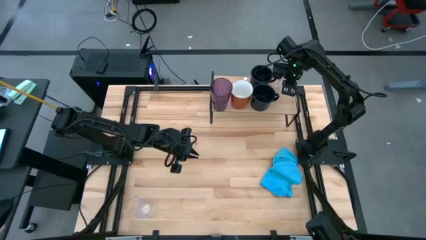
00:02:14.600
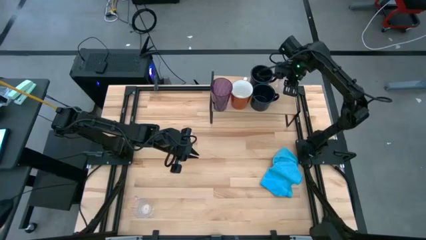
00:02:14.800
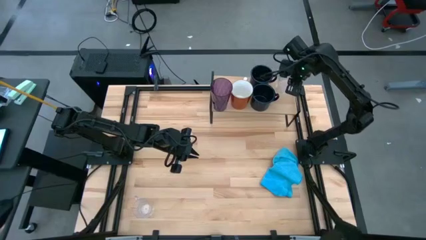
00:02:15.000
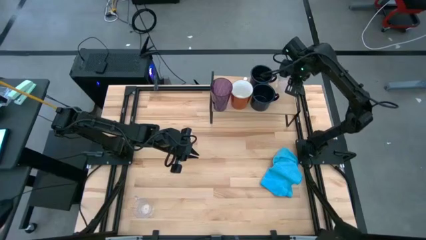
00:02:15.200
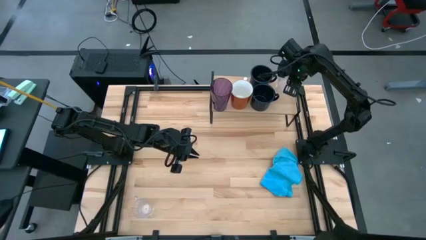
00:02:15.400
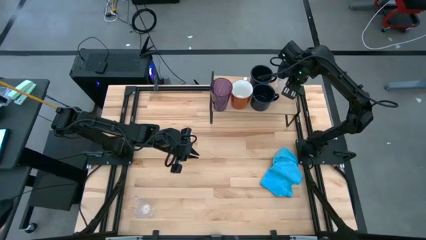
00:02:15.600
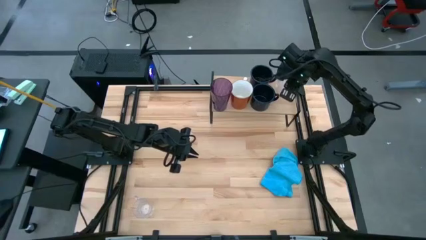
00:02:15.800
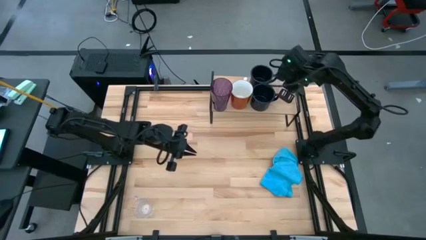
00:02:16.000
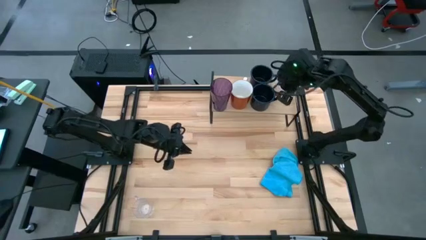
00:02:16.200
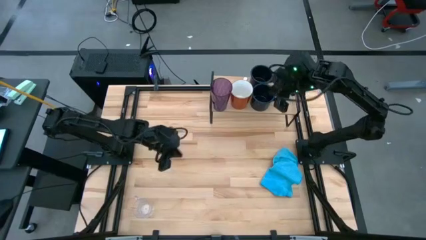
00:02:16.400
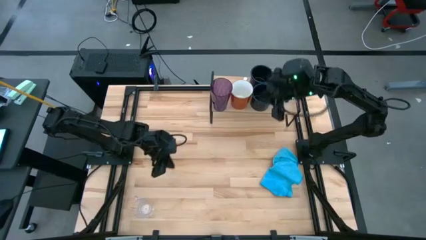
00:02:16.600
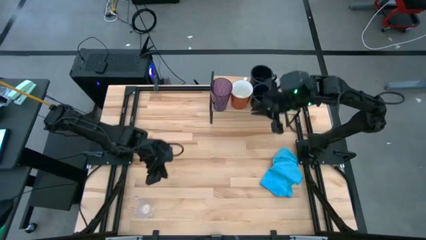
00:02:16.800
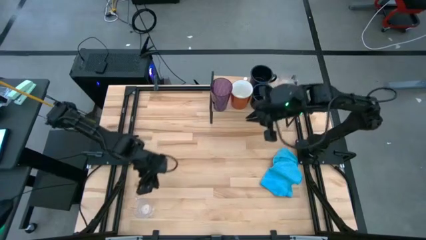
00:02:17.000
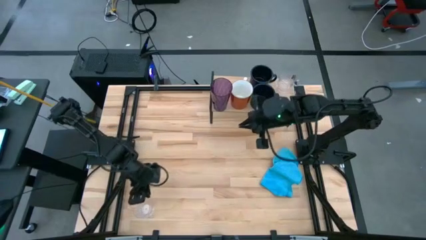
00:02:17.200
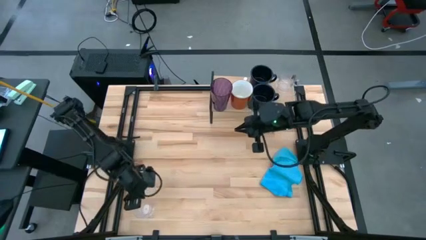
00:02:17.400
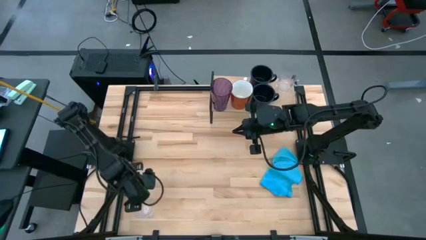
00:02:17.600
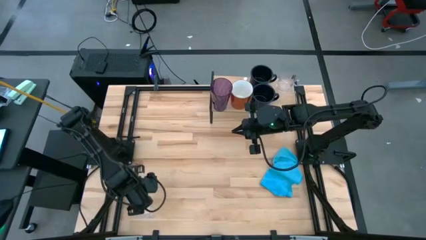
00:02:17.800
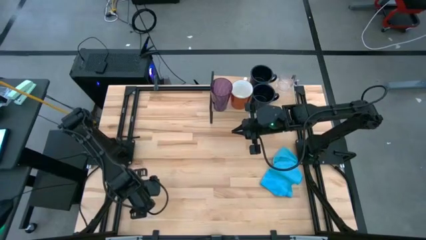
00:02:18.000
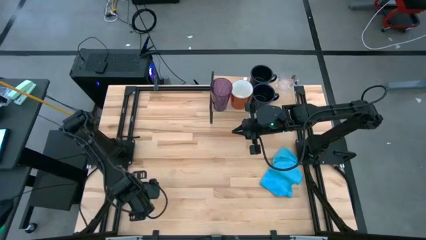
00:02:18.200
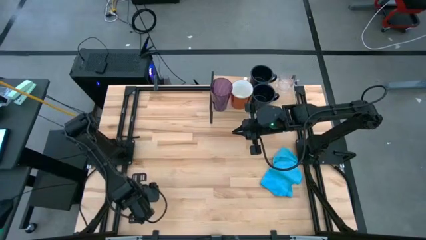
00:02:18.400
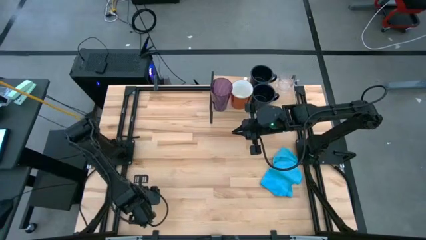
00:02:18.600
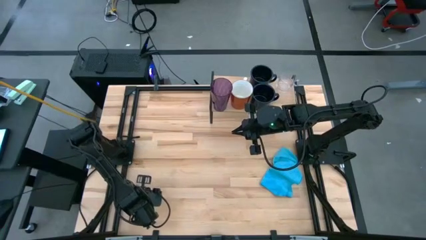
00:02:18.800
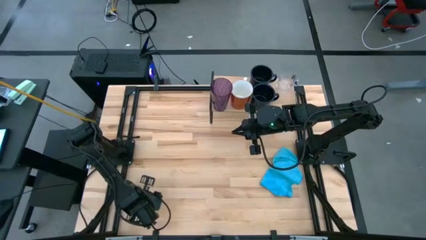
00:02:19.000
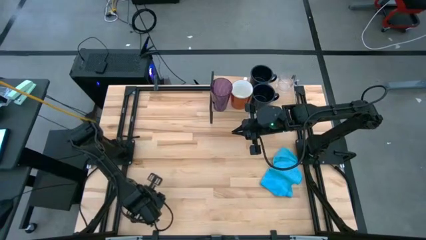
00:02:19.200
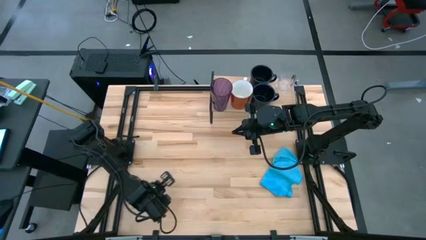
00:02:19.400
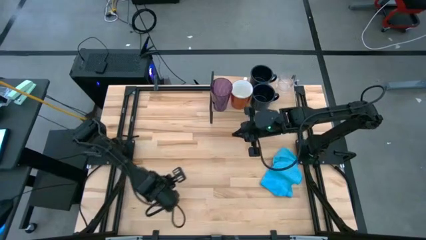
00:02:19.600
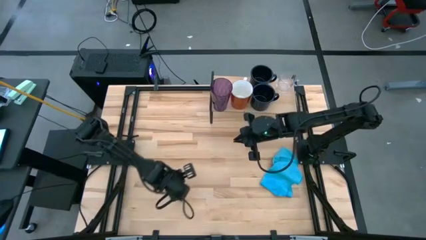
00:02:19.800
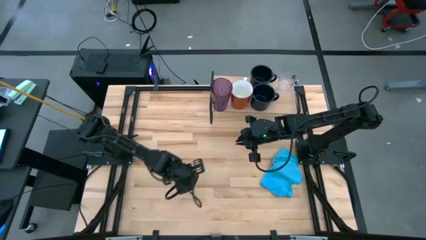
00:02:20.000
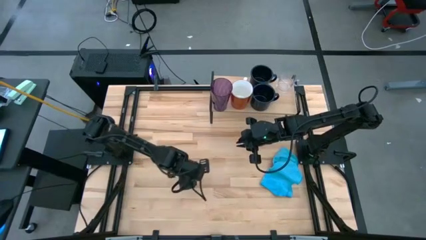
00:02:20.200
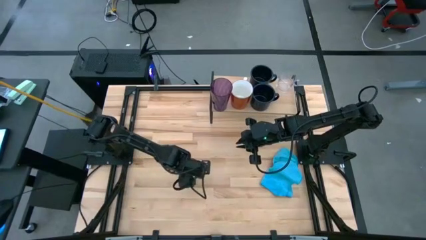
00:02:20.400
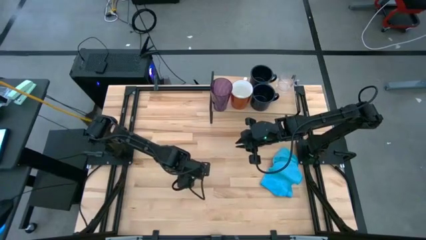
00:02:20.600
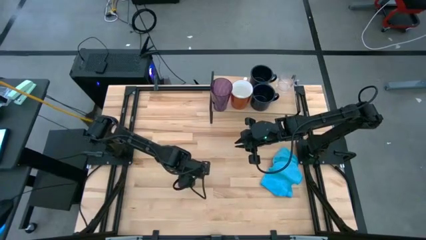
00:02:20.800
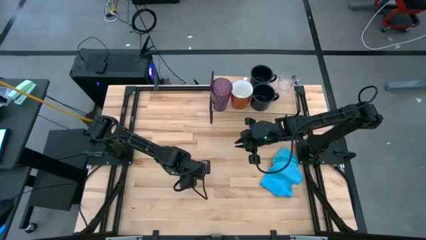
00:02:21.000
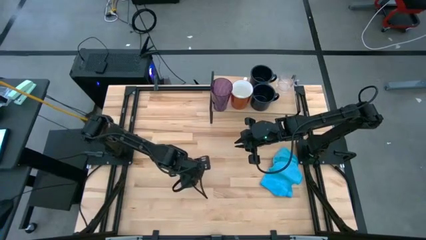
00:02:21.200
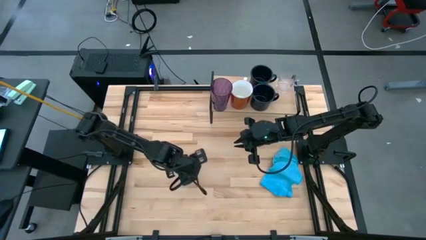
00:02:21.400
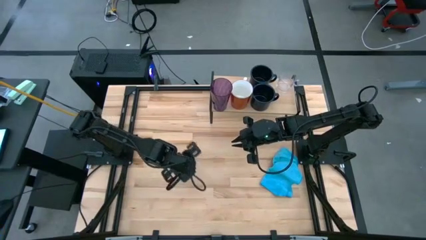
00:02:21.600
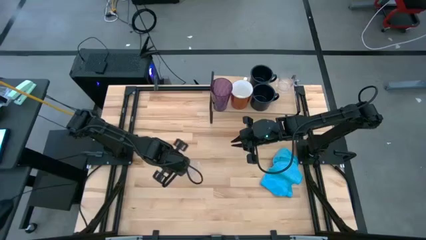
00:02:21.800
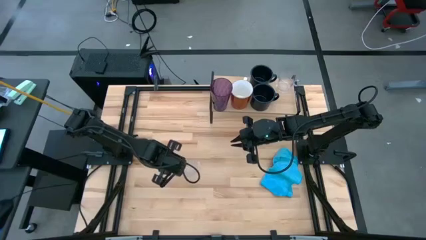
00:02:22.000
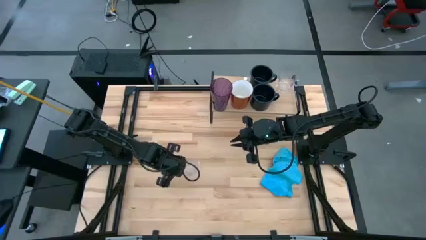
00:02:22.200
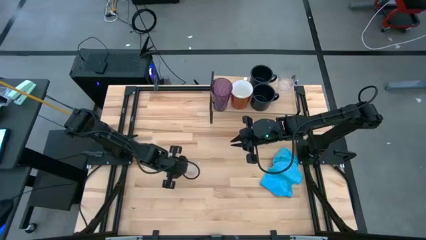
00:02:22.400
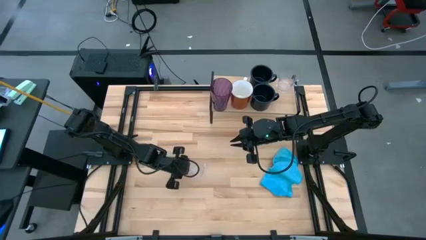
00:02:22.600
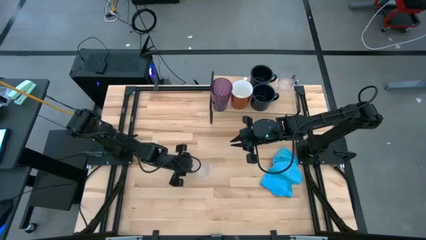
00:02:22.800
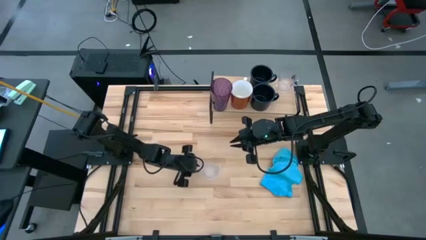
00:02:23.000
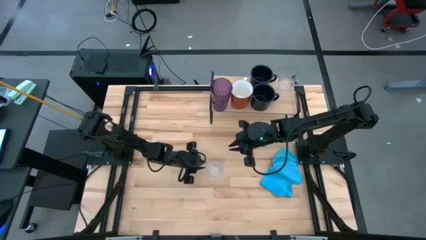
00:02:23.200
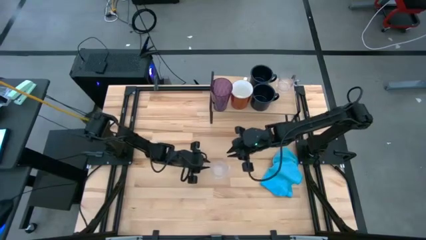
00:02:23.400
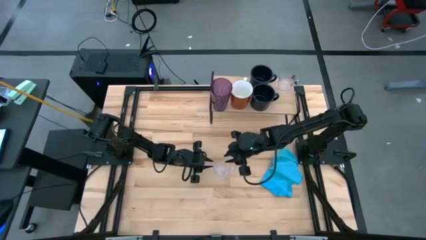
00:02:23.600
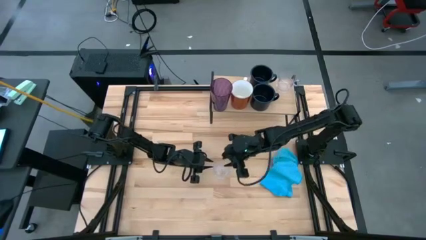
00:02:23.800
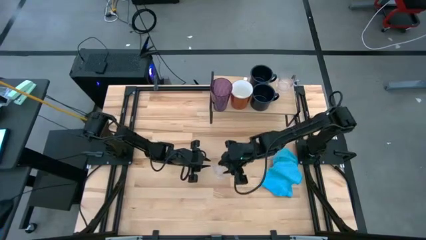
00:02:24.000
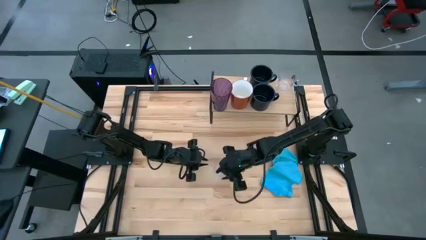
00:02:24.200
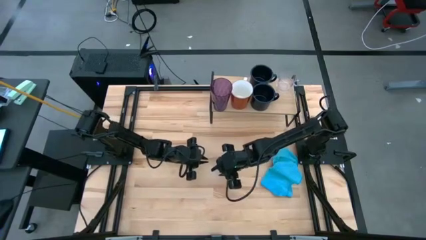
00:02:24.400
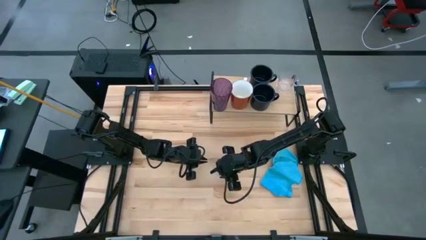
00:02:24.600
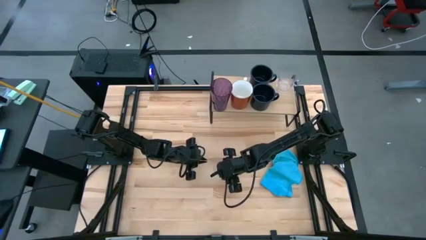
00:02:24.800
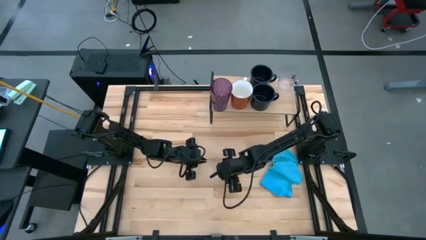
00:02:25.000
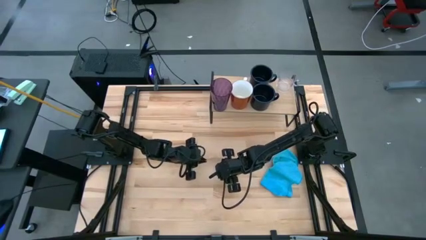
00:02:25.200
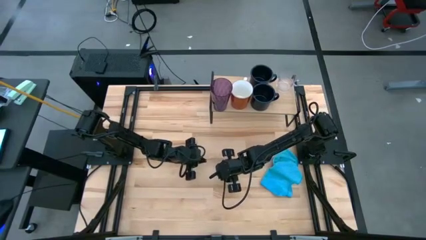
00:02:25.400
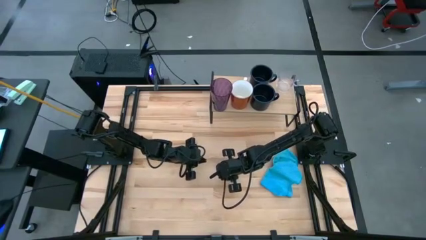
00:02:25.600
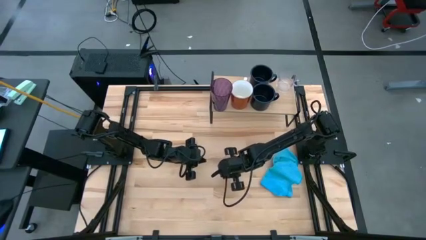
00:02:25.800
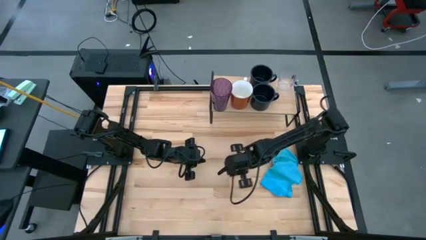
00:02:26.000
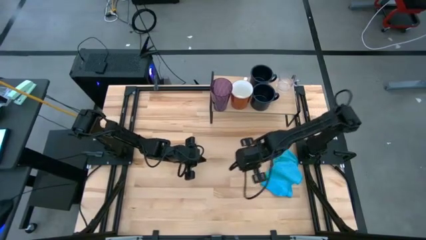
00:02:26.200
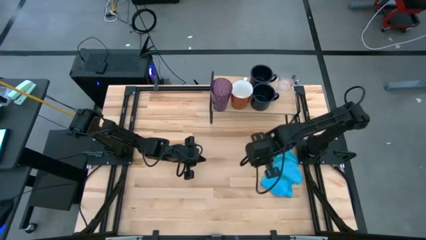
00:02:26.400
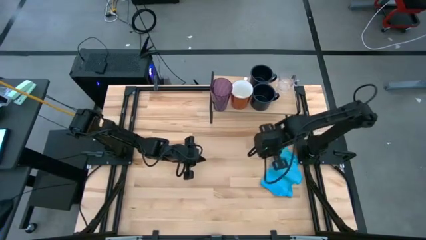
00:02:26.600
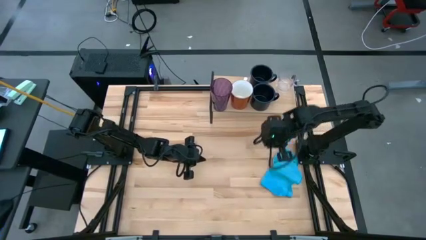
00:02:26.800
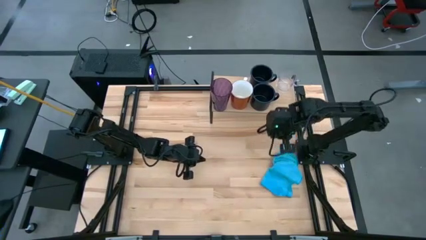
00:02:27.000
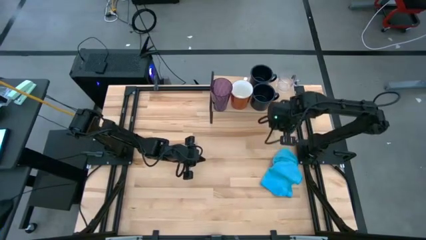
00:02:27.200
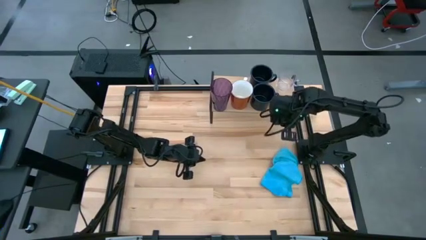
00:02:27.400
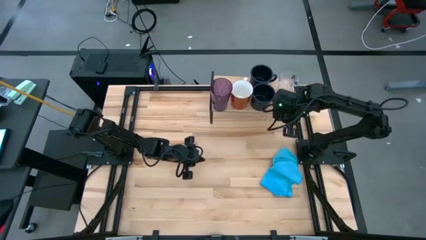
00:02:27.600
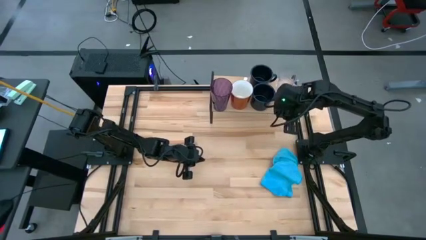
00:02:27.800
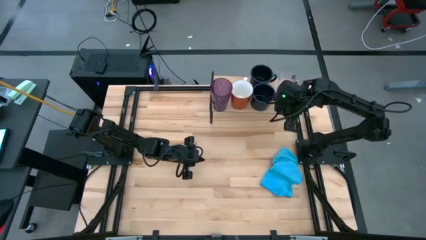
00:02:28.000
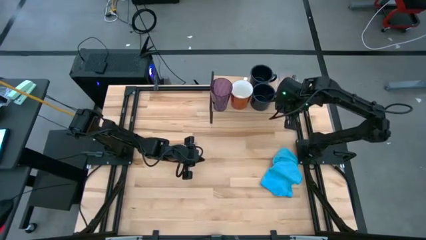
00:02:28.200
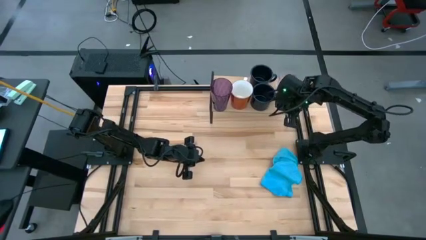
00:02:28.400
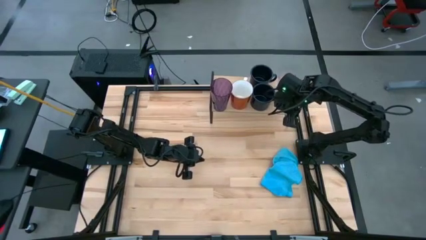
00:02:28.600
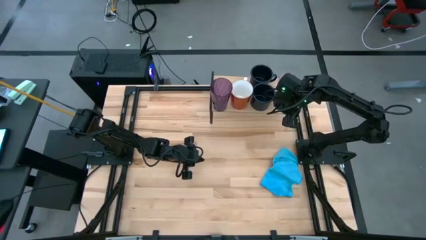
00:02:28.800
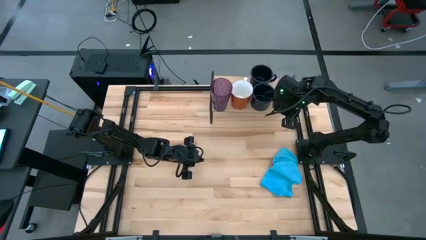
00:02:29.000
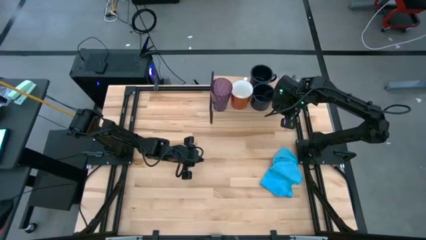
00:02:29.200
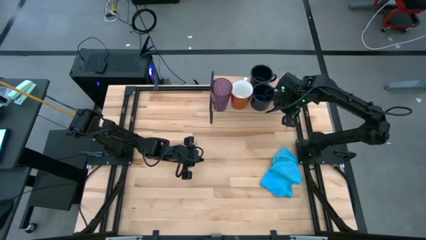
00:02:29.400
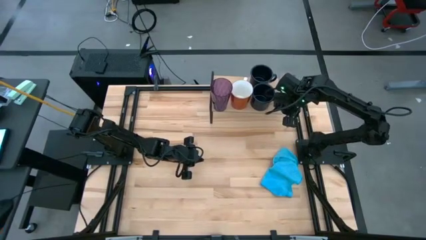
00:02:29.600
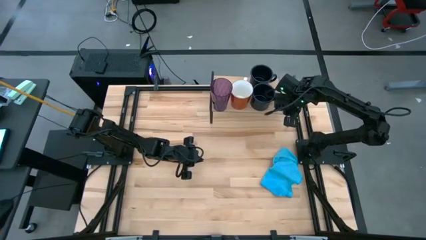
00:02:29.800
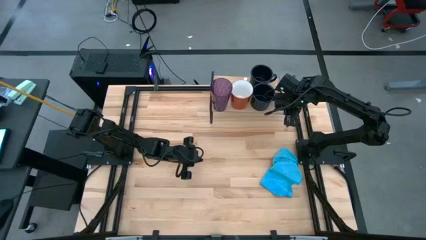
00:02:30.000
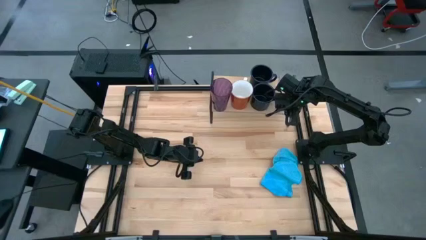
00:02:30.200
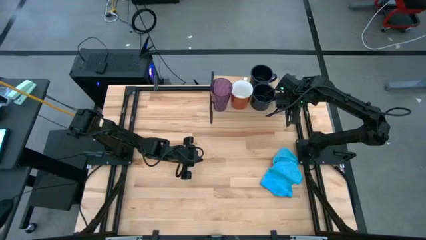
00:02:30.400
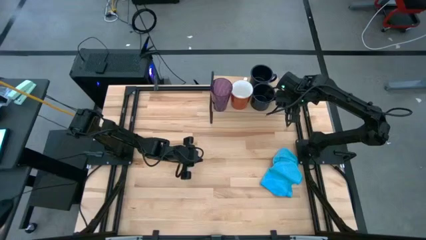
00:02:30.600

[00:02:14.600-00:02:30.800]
Task: Stack small to large cups/mugs on shelf
Put the transparent mug on the shelf

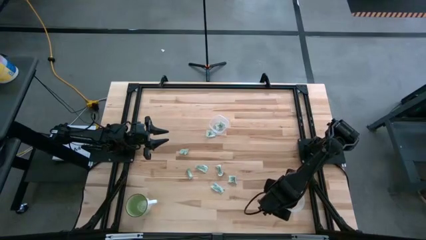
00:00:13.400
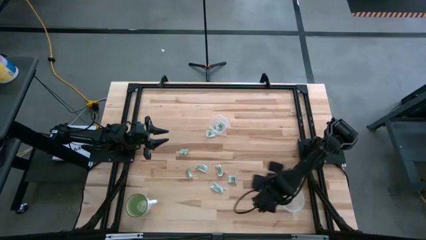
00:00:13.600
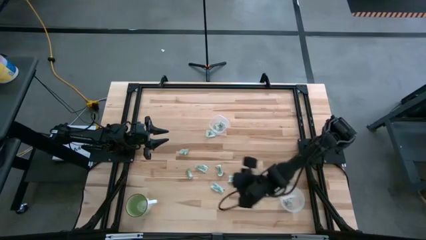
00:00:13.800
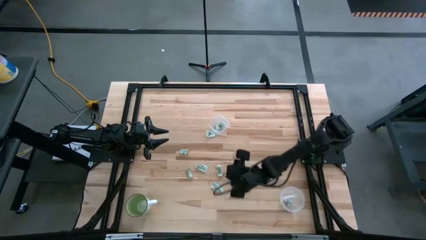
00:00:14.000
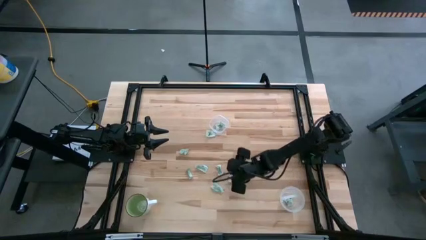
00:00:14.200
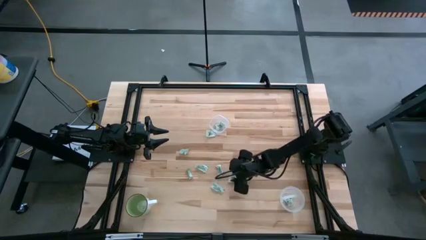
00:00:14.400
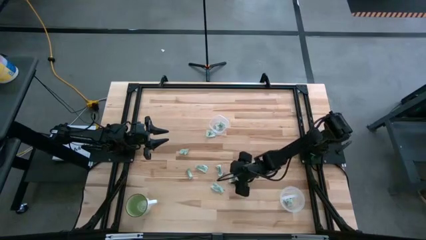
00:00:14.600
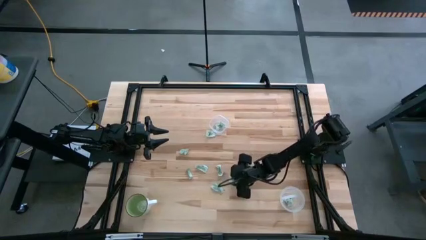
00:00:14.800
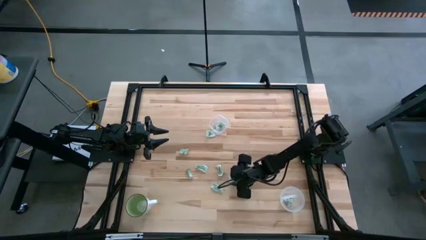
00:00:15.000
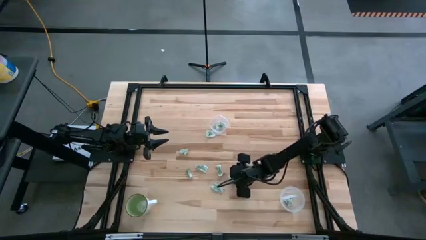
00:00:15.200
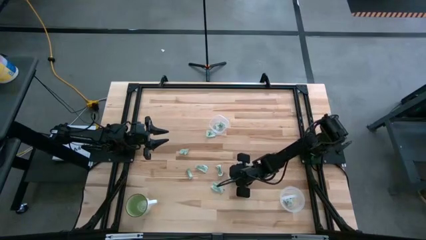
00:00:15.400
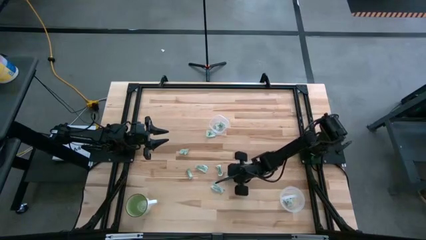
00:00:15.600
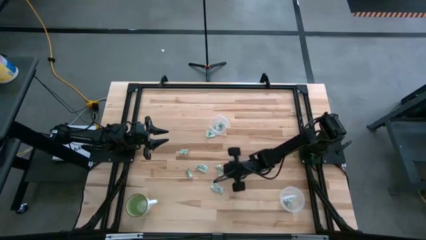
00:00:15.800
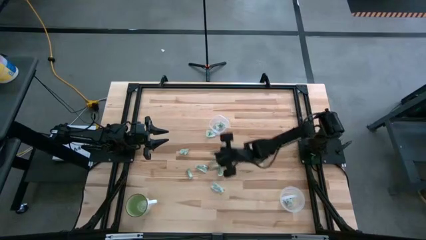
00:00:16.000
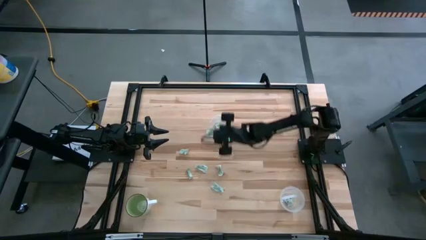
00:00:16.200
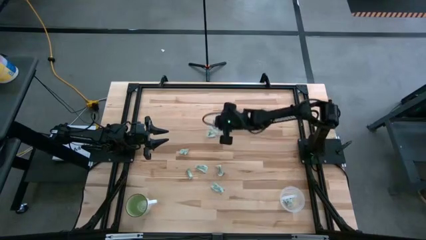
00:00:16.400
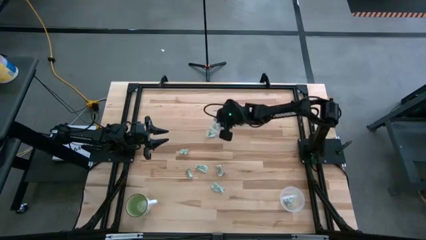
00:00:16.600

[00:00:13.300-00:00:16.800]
Task: Pick and place items into bin
Put the green stevia packet into the square transparent bin
